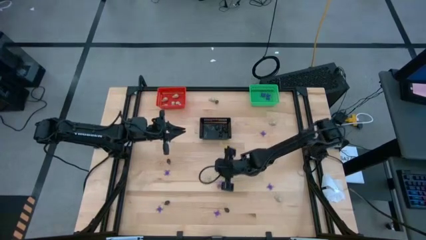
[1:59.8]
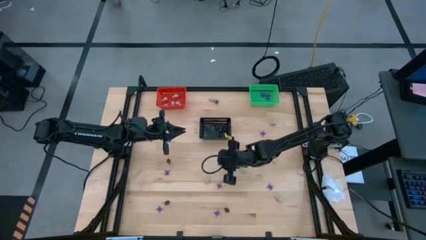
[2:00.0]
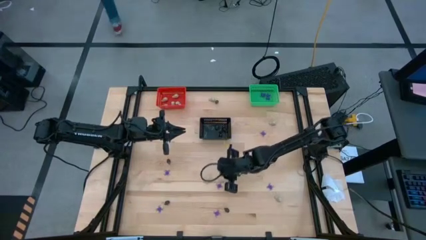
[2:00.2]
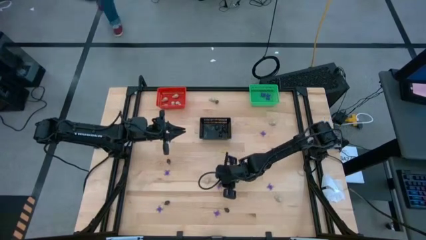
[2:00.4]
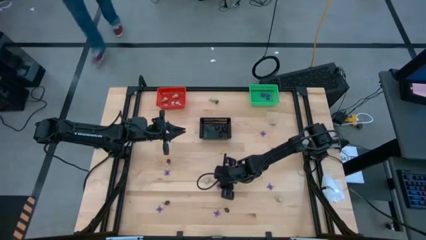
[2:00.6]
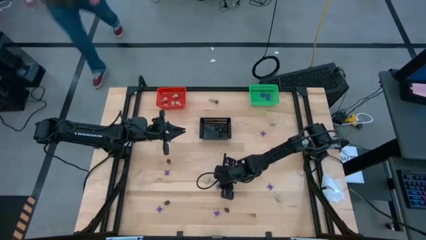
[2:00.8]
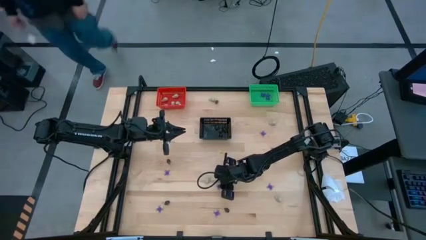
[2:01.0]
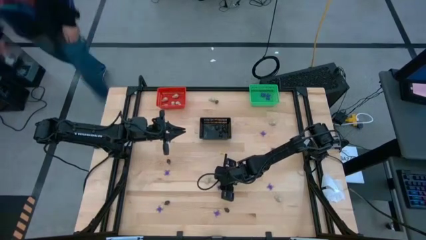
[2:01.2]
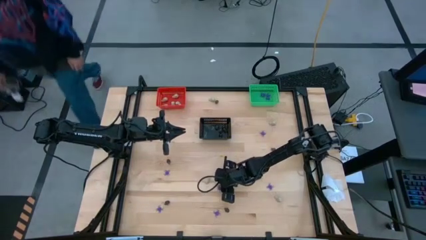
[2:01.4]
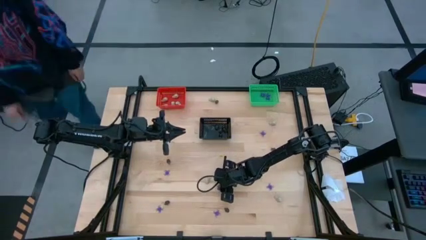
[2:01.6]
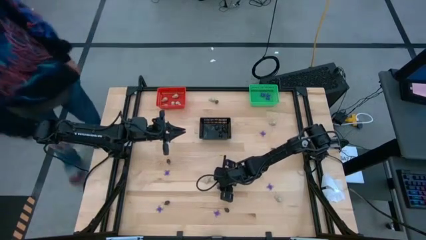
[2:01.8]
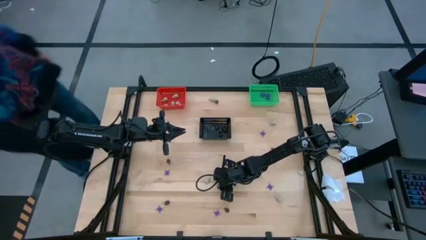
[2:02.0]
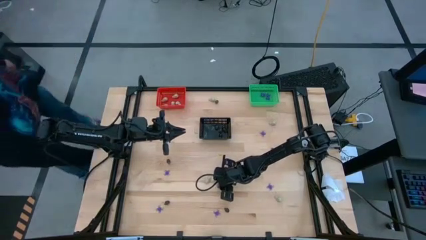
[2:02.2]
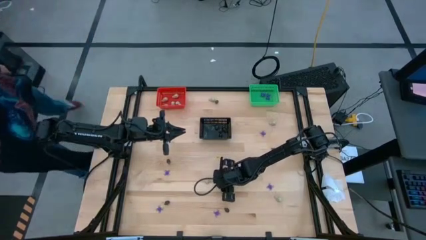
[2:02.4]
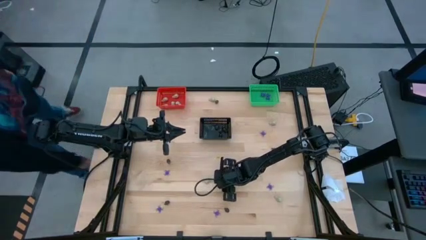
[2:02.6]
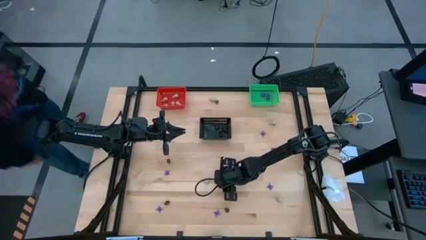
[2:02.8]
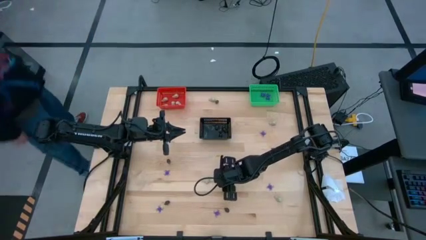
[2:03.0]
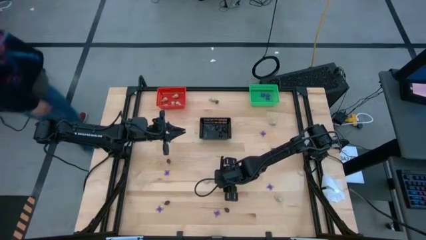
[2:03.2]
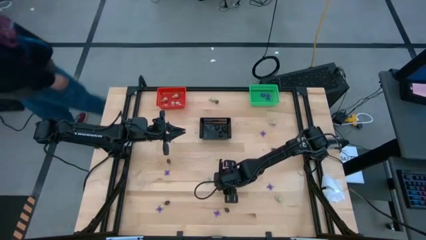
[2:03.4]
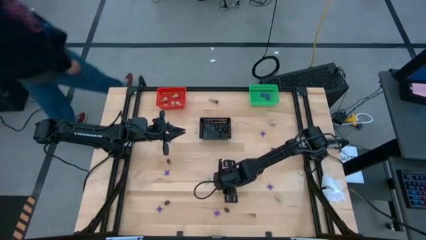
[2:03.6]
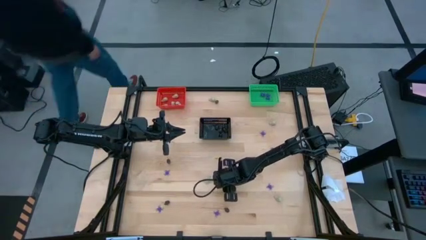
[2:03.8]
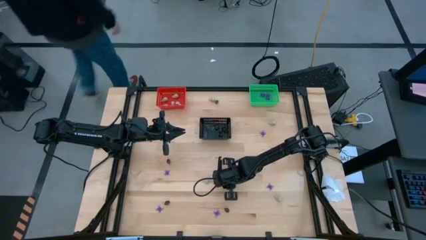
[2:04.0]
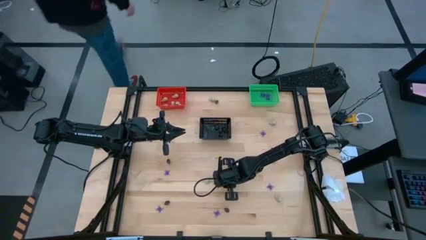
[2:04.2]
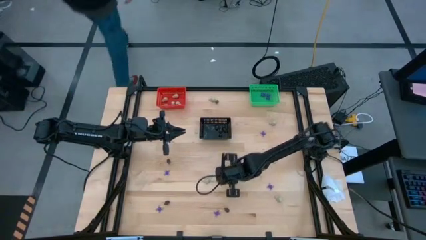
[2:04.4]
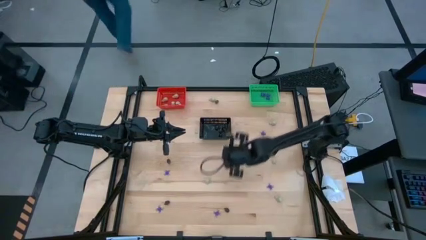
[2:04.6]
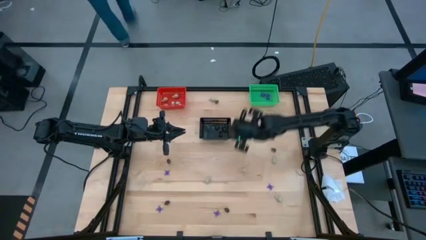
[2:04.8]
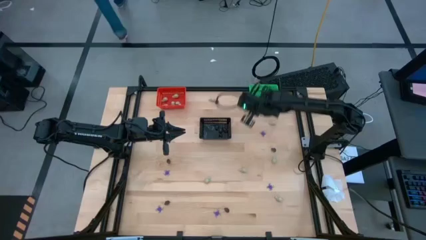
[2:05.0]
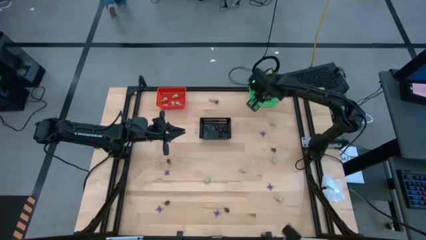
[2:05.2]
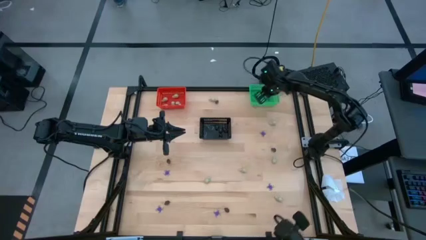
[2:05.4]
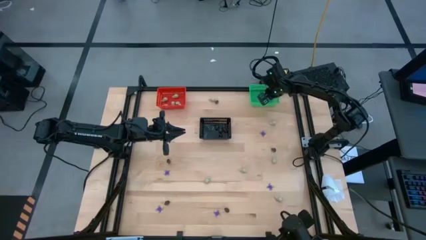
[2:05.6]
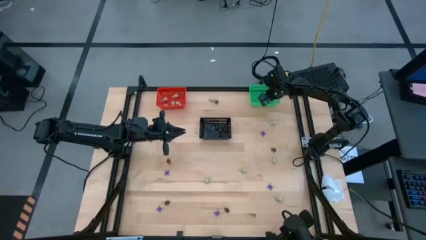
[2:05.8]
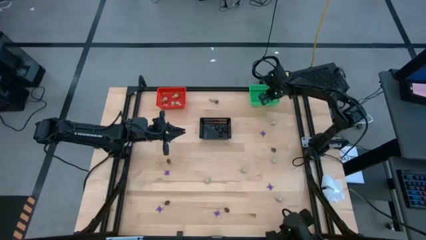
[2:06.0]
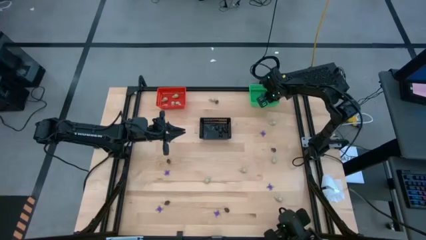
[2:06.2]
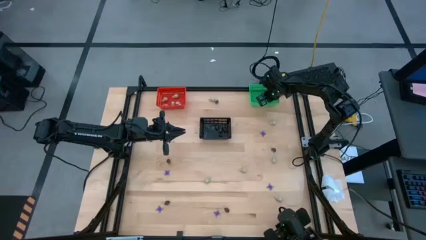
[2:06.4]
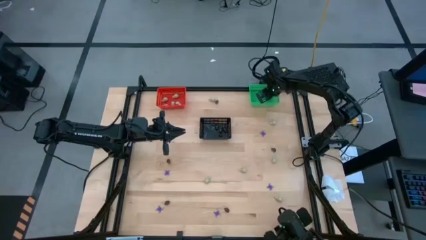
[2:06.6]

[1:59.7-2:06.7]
Task: Sort Halloween decoration
Put the violet spider toy into the green bin

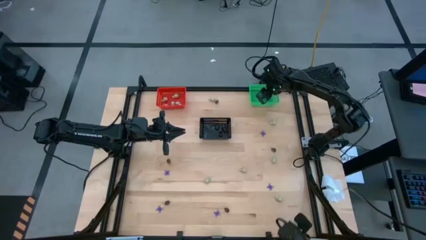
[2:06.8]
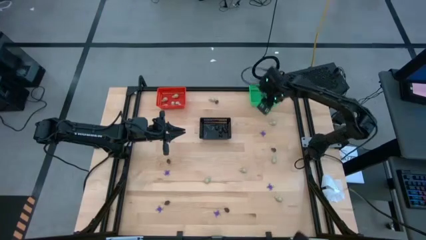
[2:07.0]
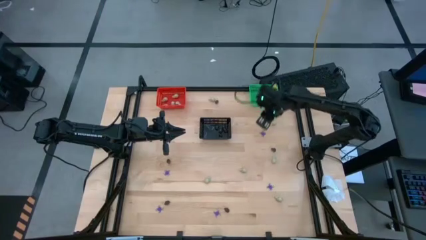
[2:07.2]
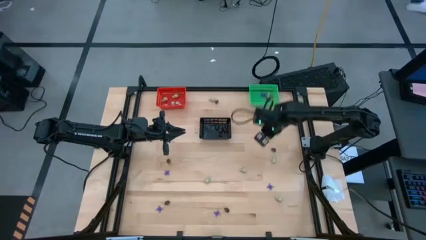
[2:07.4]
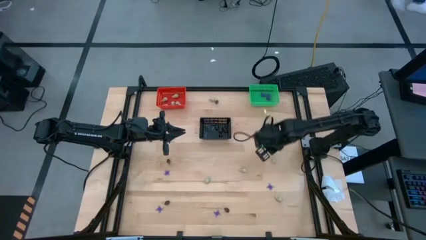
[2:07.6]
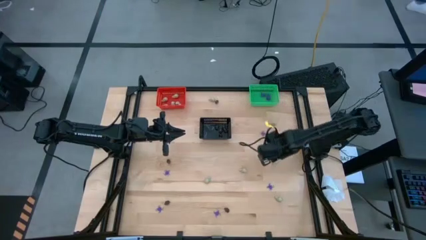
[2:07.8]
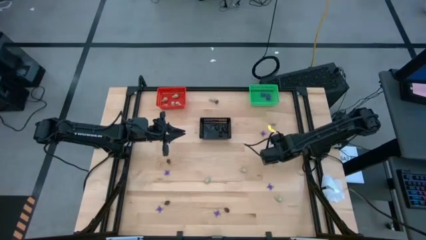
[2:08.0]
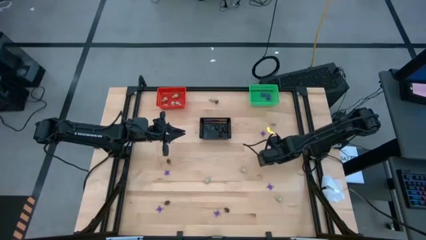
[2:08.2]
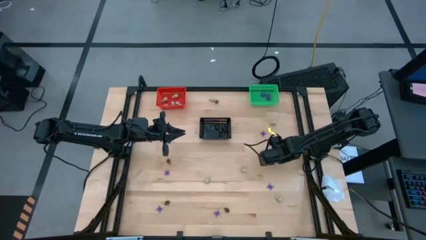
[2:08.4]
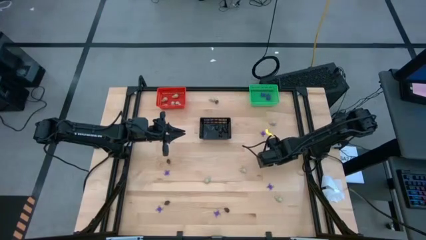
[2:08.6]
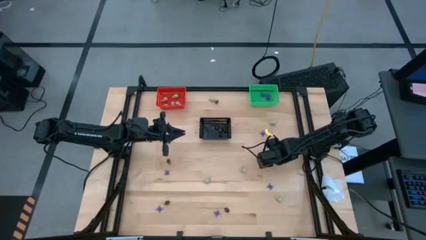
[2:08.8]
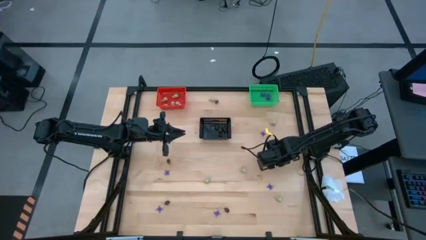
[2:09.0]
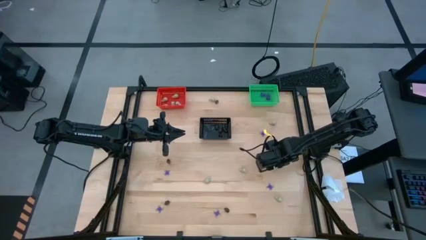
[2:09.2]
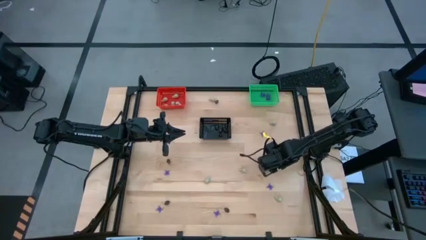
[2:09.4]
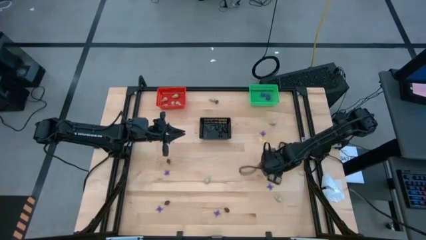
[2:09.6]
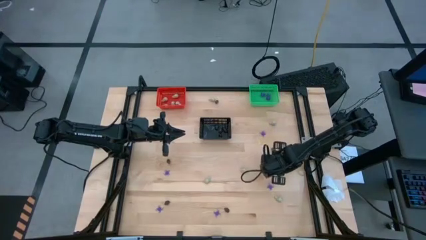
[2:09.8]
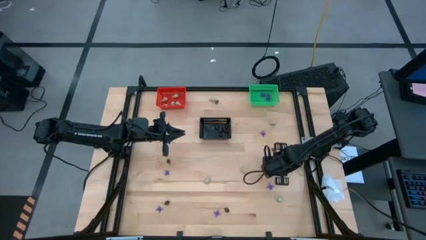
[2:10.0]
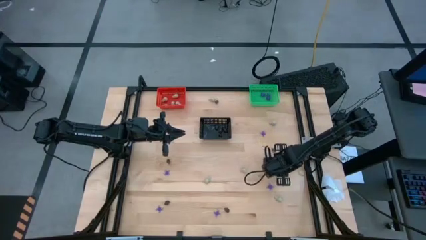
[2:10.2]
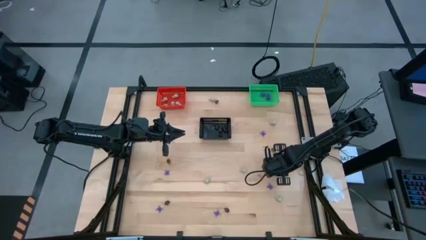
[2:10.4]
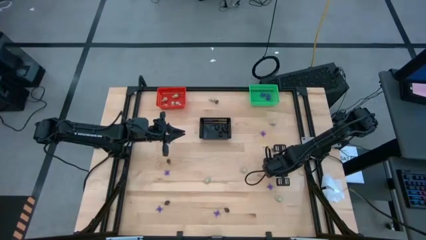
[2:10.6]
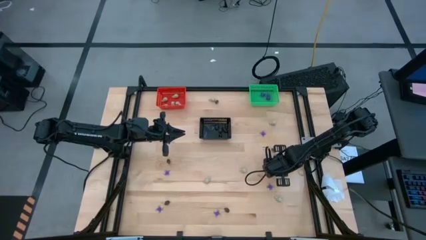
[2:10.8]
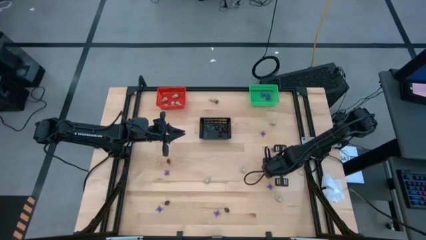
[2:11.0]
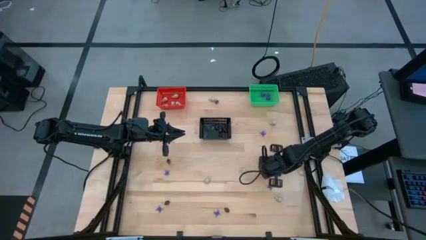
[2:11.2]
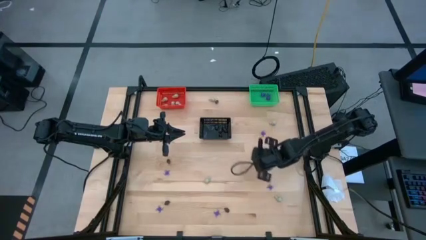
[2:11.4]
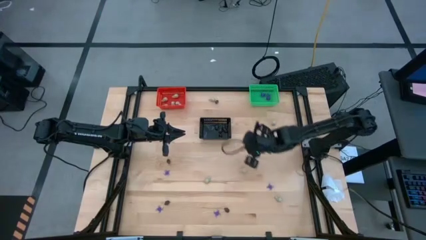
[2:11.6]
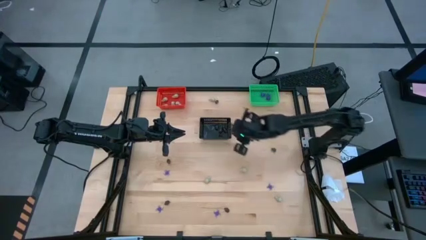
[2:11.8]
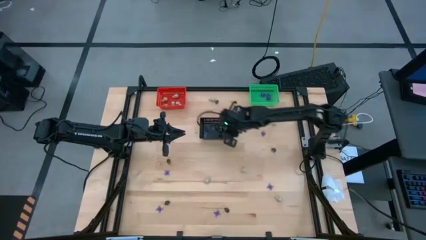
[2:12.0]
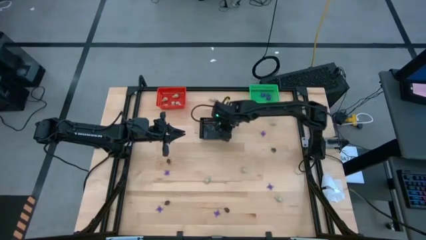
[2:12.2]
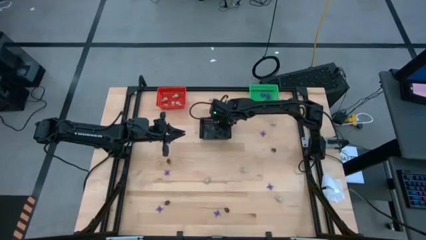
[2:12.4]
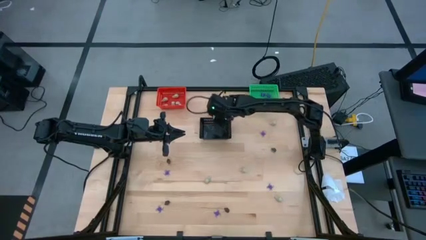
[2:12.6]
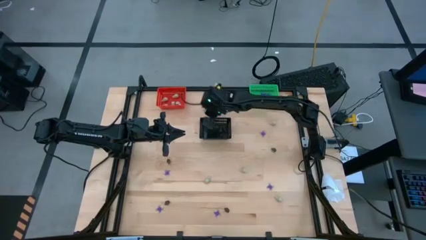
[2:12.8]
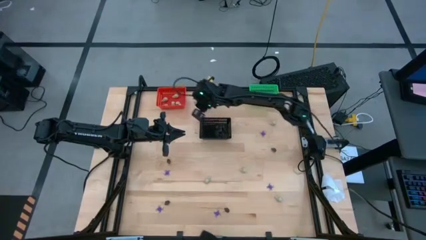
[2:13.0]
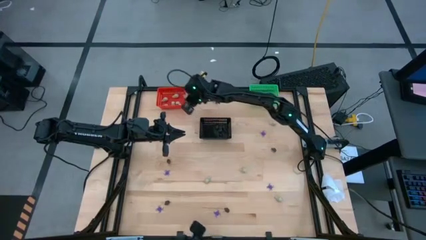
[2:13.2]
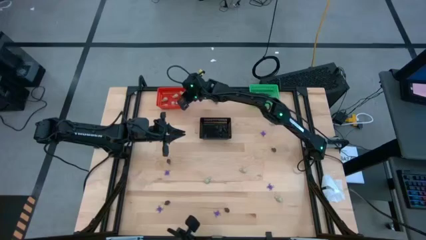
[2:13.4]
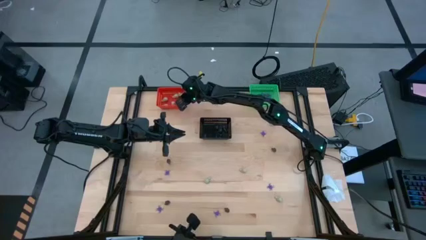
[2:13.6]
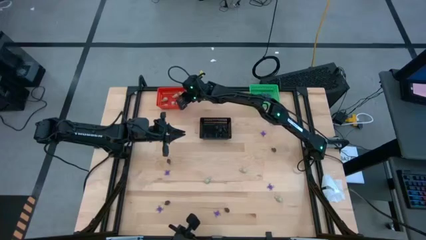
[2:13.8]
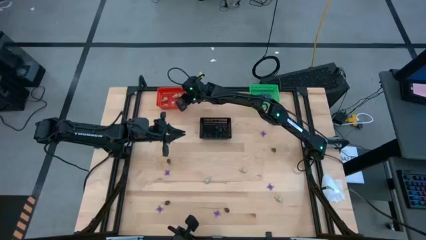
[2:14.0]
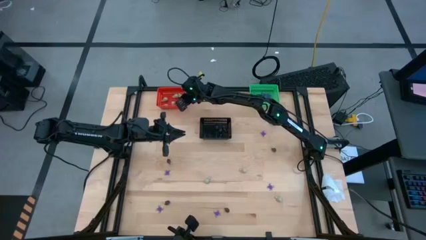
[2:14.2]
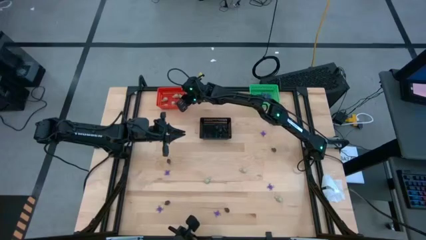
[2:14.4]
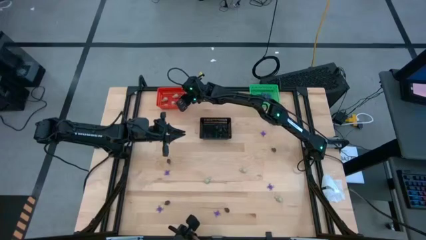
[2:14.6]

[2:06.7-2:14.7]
Put the white skull toy into the orange bin
